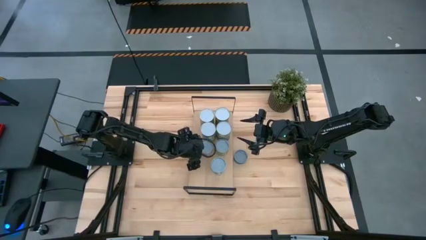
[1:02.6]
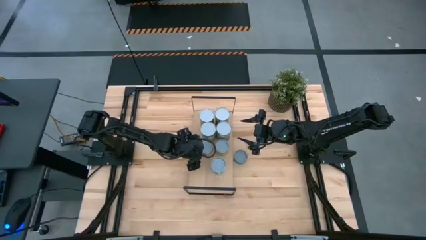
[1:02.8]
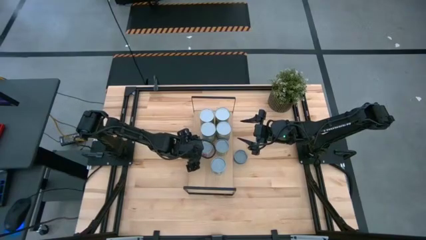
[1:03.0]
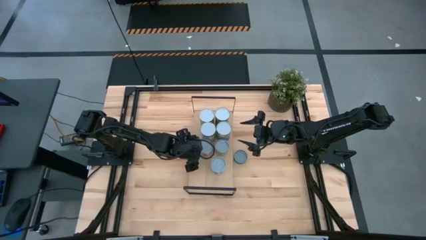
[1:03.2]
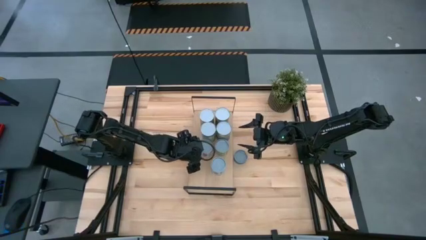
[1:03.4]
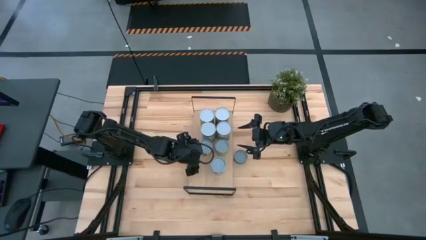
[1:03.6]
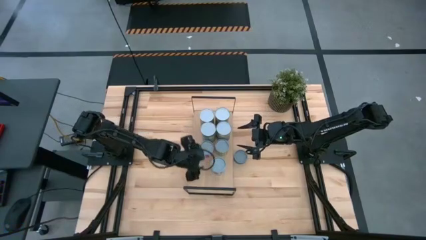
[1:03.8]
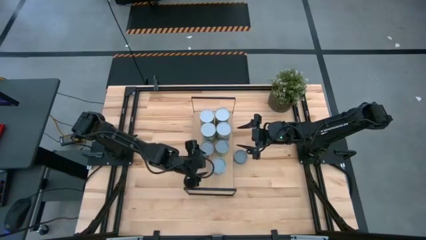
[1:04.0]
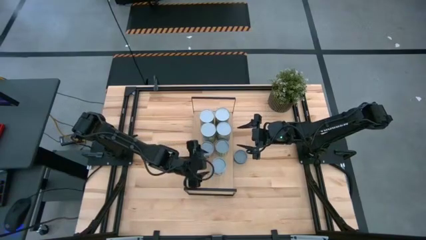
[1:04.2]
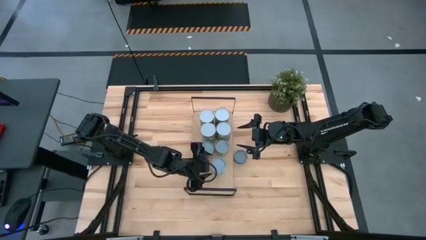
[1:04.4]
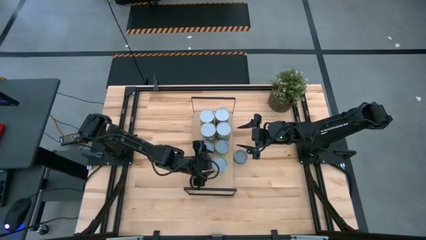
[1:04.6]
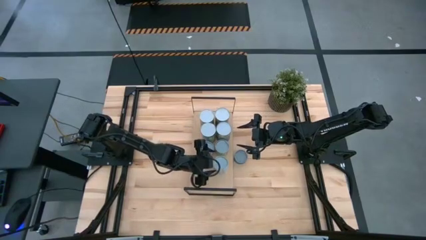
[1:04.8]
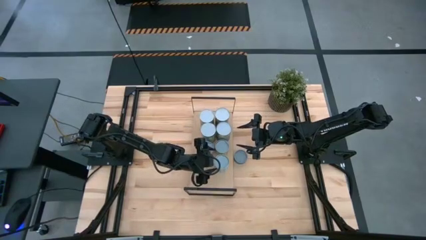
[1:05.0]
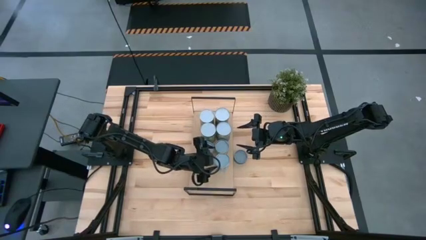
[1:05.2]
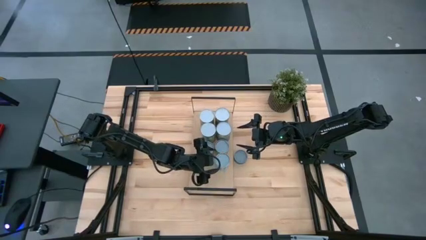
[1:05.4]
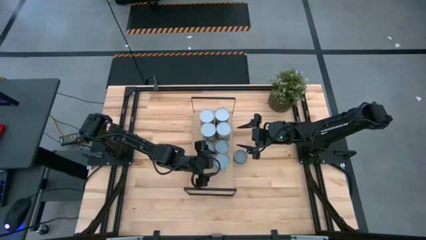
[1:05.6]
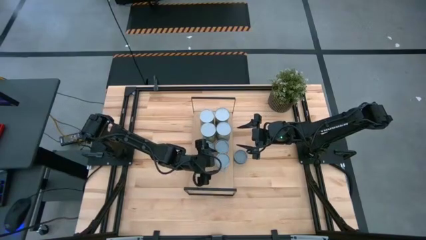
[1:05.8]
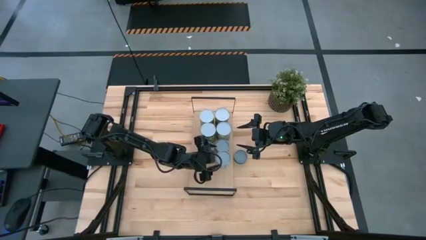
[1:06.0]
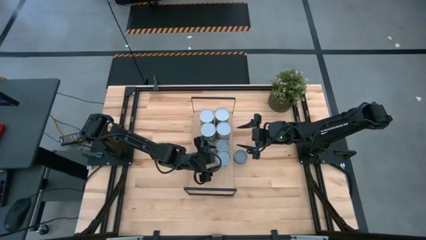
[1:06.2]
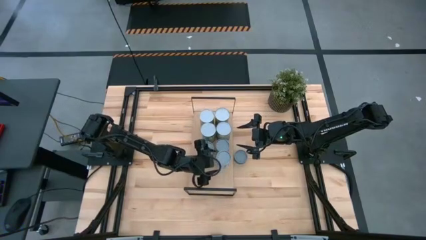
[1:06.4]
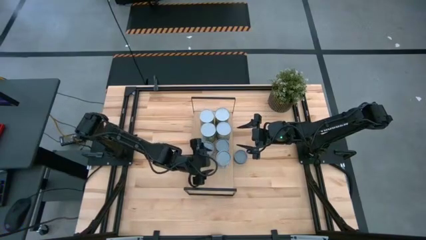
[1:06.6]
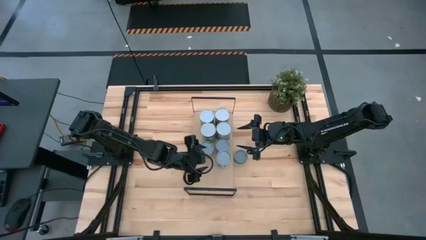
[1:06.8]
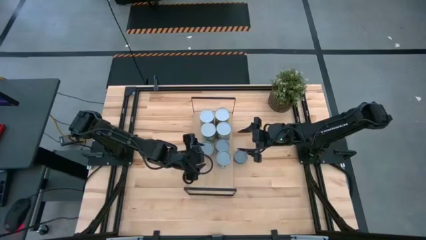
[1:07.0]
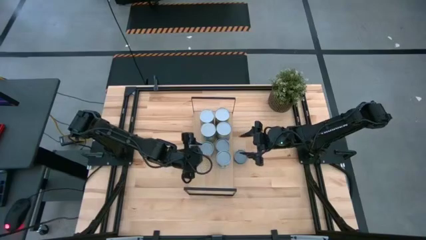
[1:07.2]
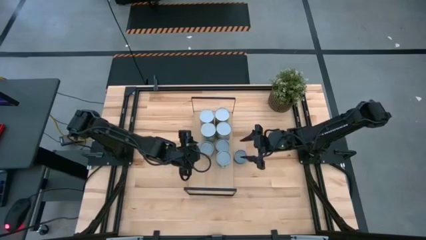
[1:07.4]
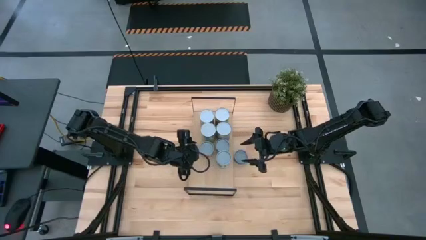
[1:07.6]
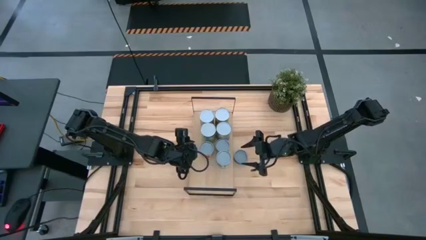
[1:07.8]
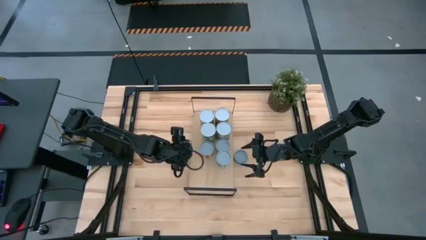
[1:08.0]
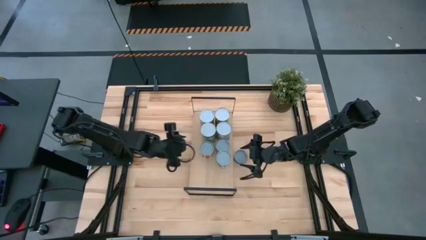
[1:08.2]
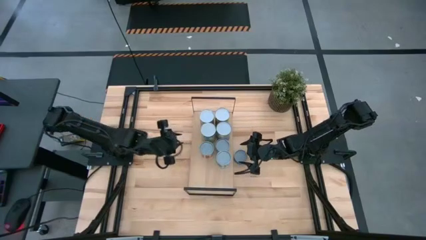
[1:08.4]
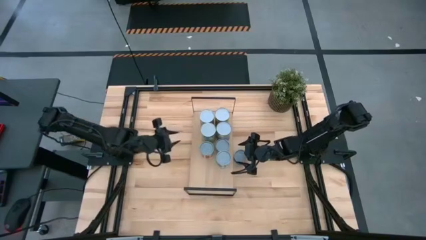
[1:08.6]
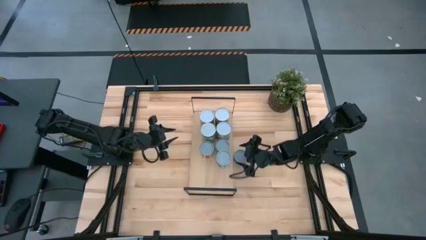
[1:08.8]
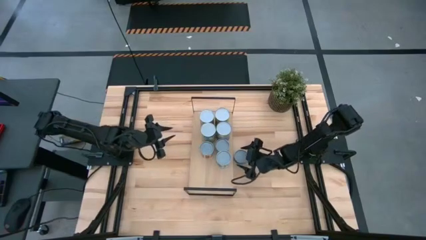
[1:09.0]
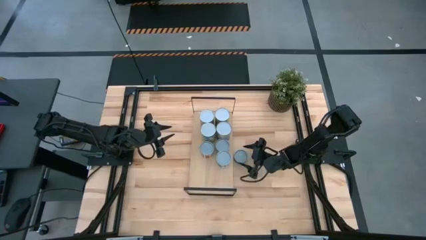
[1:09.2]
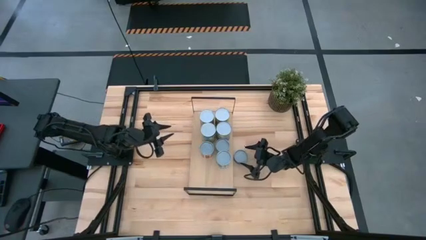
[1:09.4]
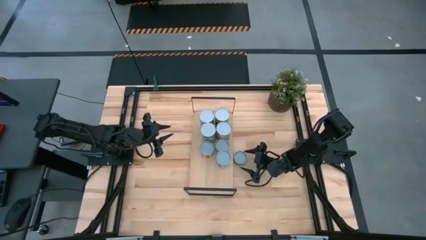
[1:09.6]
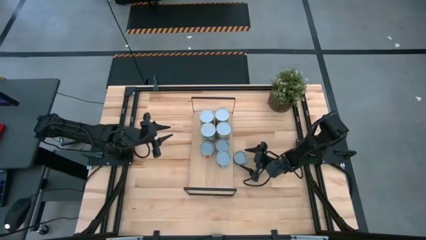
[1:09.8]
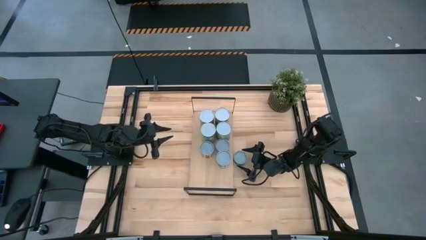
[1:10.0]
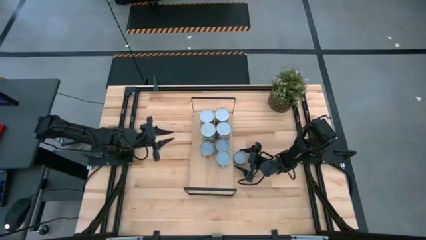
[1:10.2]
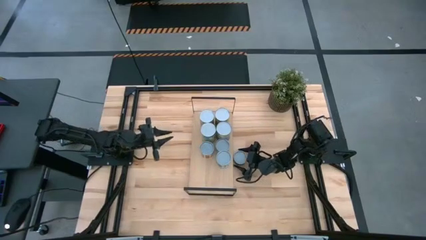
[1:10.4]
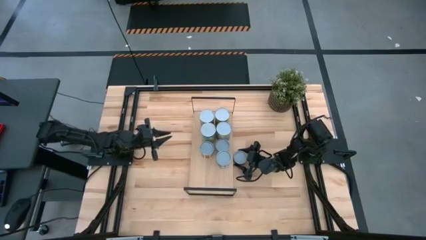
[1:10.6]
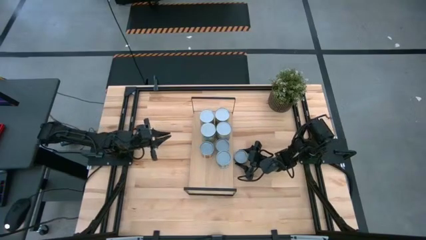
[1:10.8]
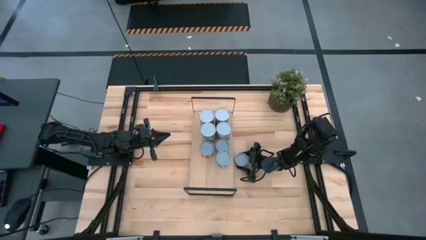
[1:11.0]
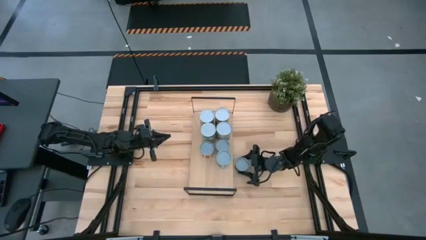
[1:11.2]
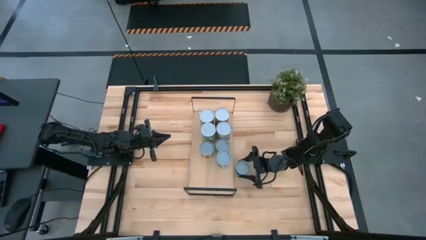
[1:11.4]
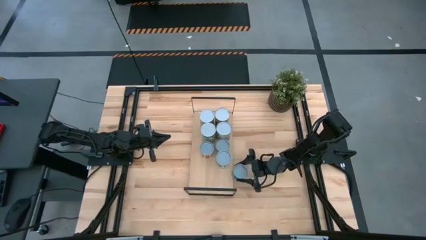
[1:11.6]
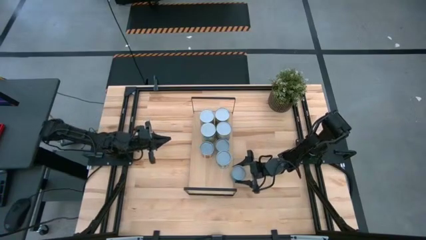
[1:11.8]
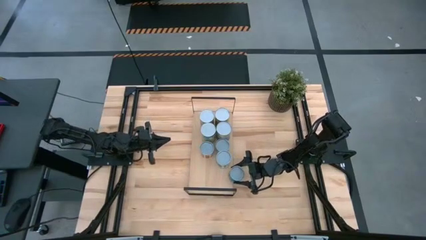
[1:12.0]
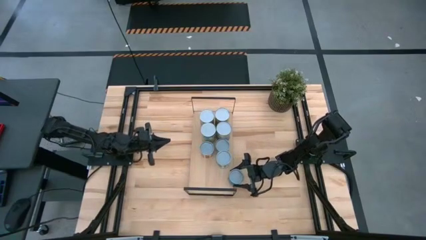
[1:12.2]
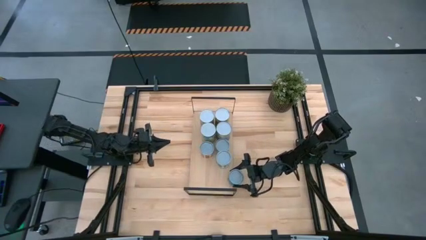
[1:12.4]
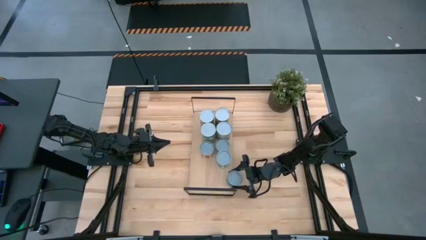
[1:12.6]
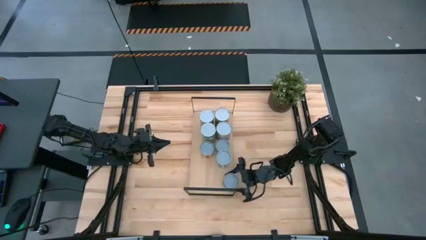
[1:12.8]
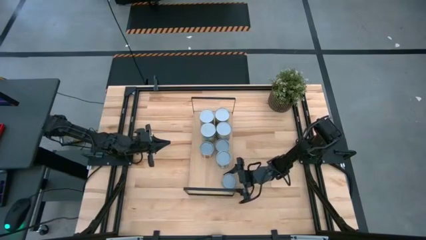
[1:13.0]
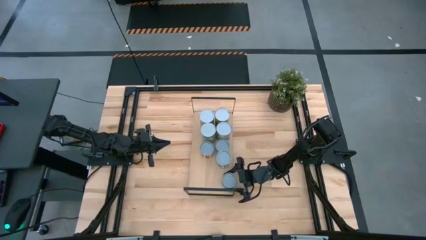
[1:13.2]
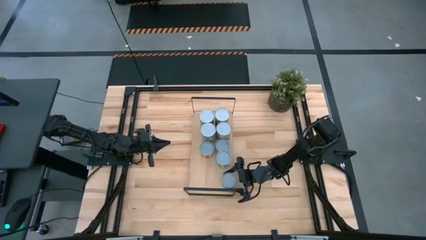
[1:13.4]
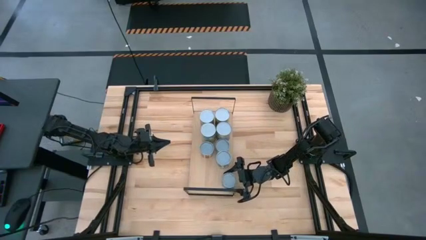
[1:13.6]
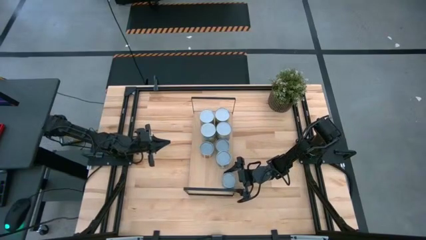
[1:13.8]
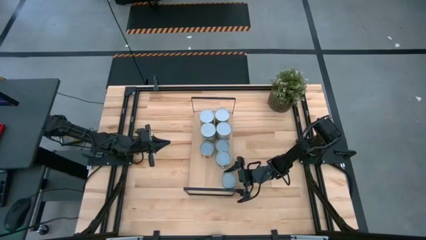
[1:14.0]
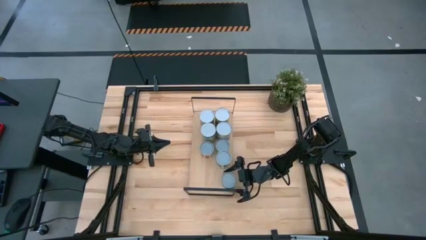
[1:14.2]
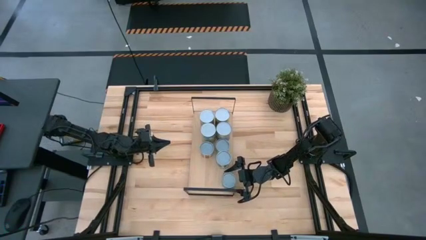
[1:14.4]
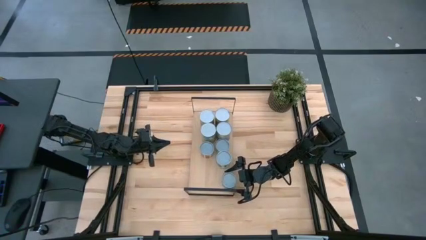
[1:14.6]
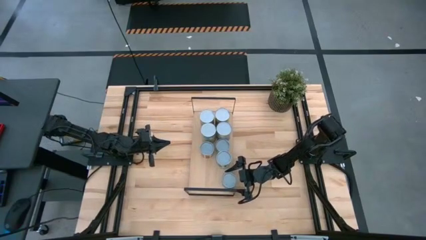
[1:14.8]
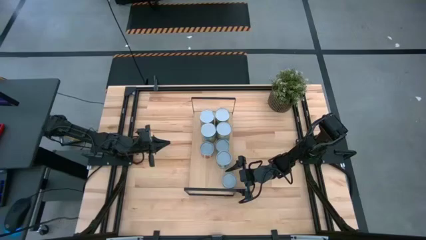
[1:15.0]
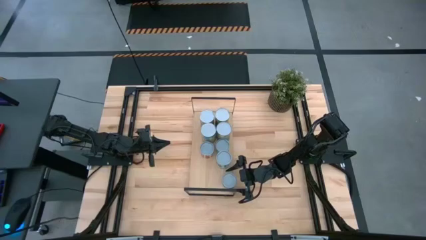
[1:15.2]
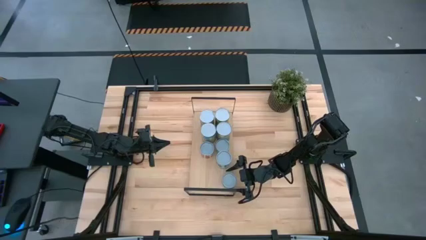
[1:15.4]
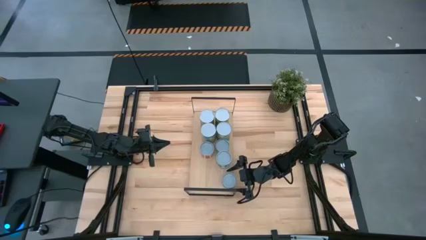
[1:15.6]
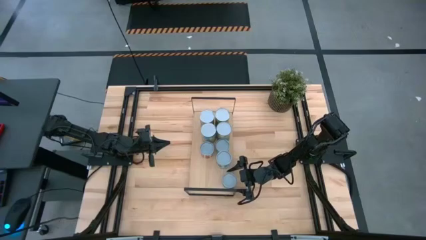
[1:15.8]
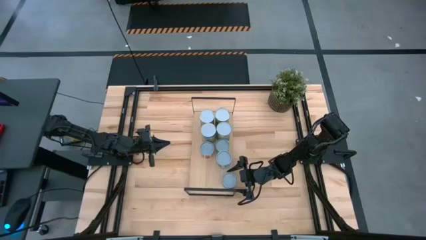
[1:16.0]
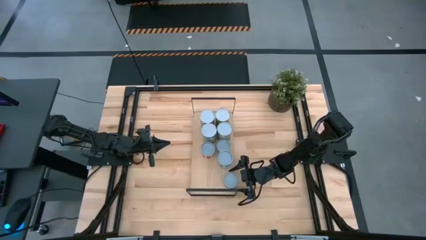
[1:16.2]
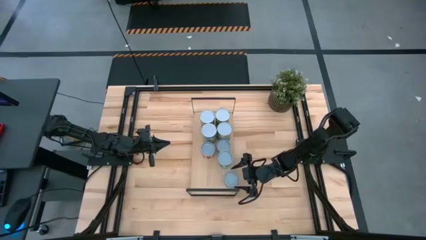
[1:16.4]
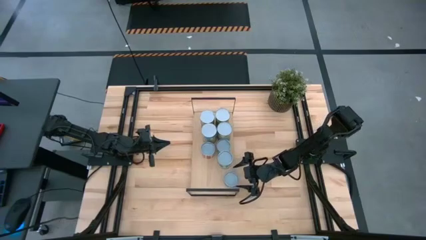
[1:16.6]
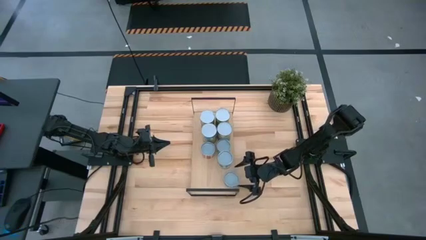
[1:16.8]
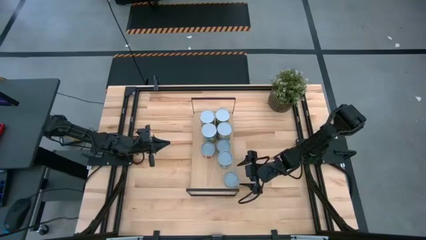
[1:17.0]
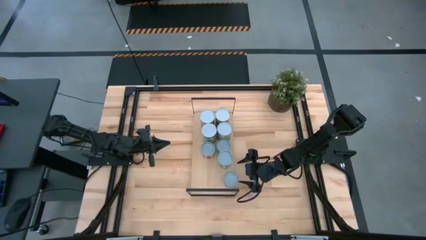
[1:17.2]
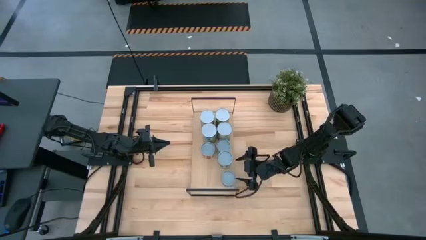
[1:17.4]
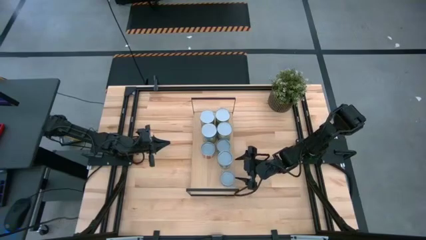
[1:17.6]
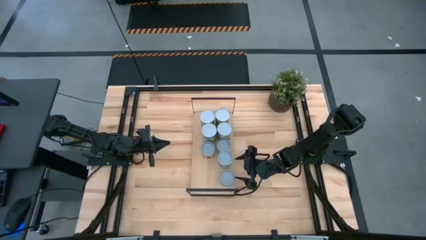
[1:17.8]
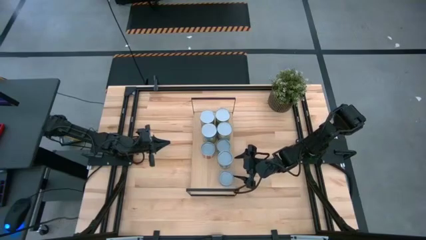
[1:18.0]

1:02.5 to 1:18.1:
Task: Pick and place cans onto a shelf
Put the canned tuna on the shelf
